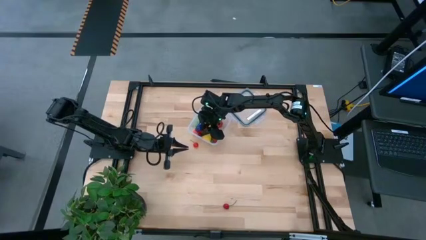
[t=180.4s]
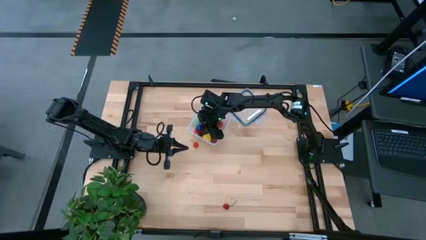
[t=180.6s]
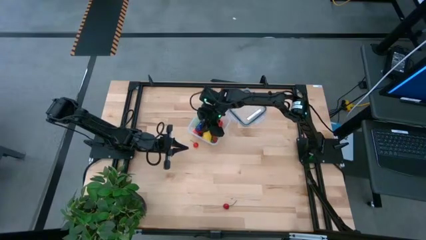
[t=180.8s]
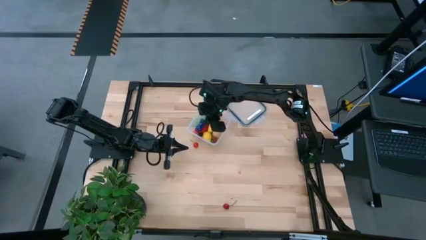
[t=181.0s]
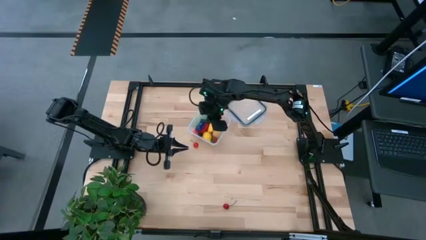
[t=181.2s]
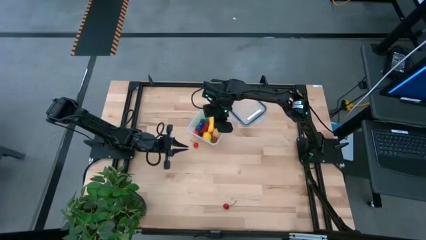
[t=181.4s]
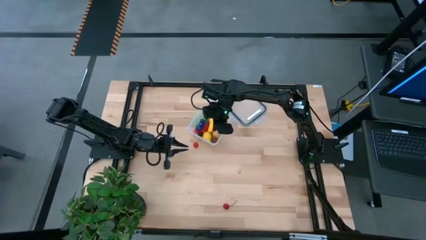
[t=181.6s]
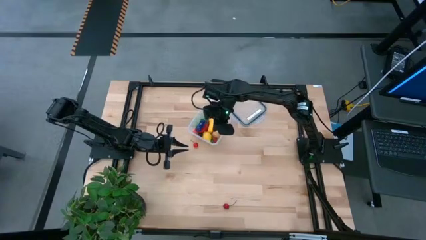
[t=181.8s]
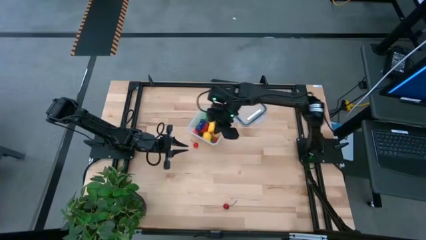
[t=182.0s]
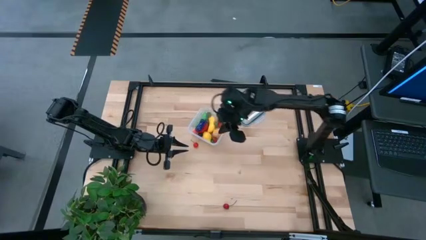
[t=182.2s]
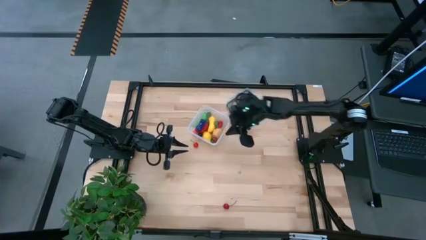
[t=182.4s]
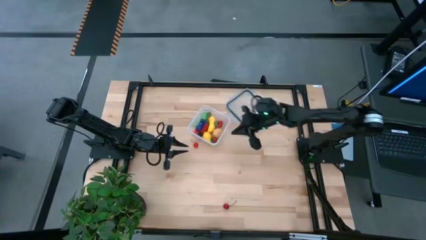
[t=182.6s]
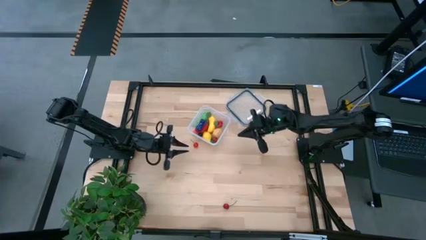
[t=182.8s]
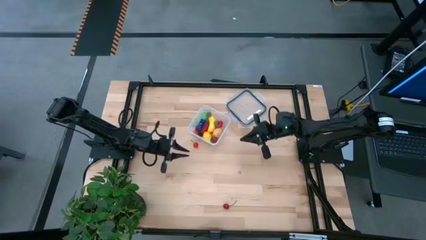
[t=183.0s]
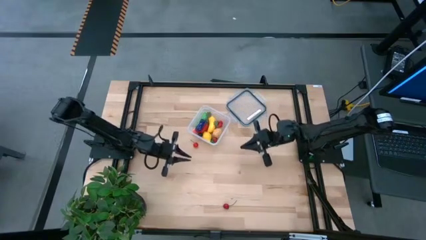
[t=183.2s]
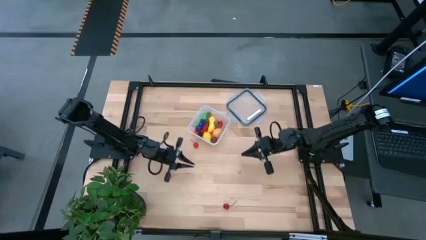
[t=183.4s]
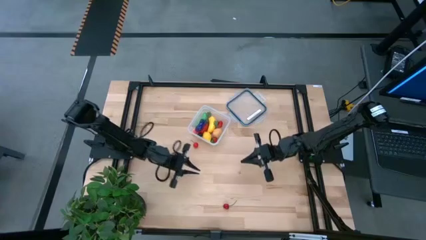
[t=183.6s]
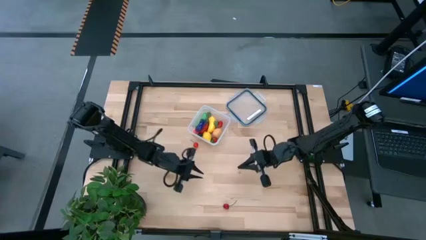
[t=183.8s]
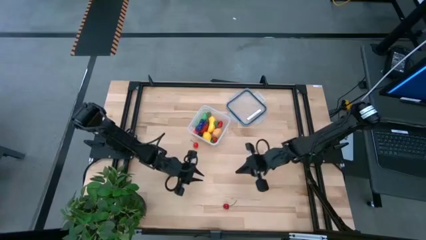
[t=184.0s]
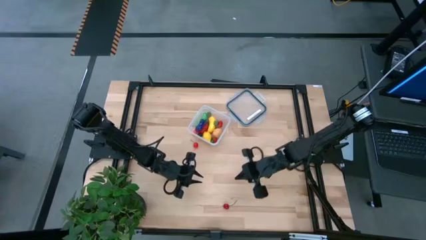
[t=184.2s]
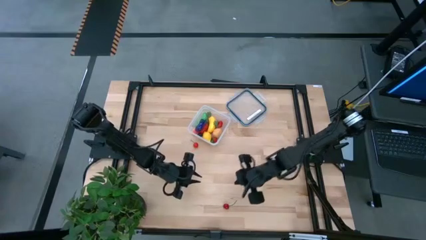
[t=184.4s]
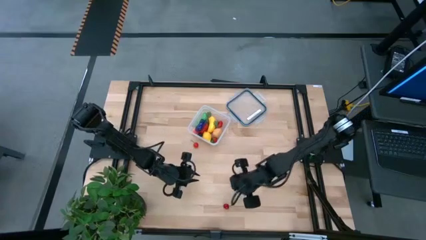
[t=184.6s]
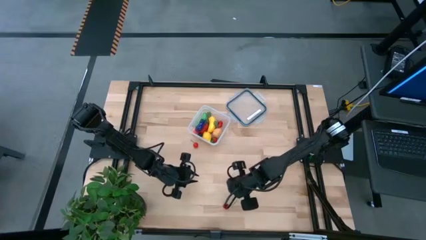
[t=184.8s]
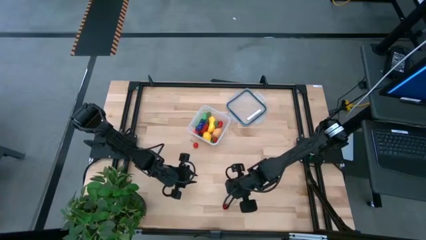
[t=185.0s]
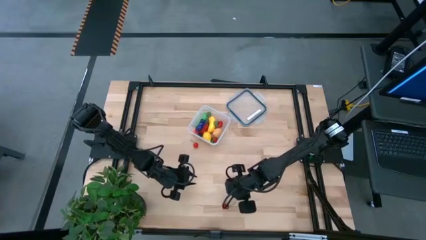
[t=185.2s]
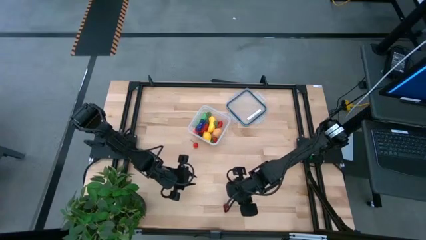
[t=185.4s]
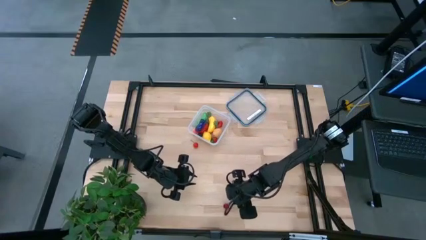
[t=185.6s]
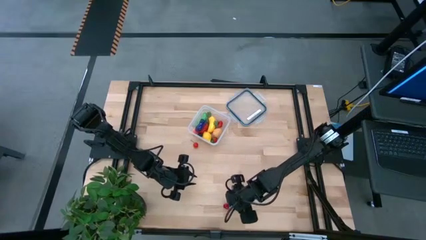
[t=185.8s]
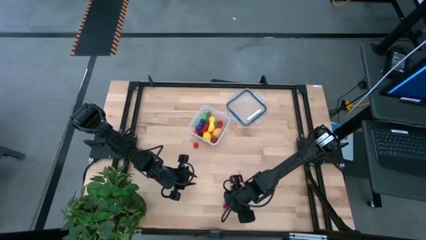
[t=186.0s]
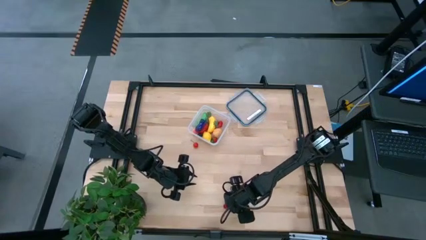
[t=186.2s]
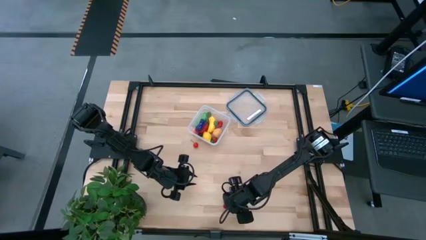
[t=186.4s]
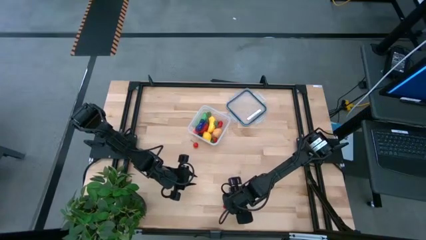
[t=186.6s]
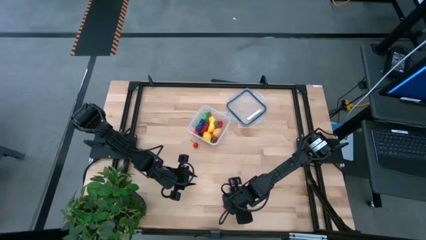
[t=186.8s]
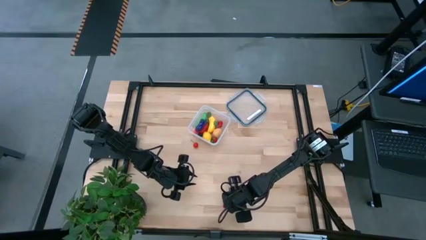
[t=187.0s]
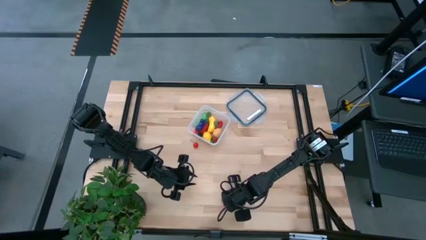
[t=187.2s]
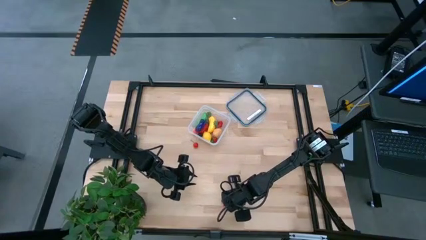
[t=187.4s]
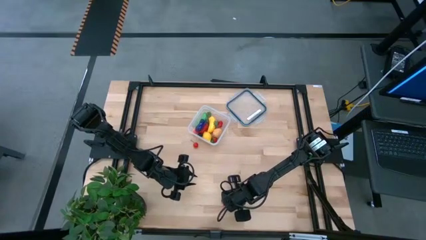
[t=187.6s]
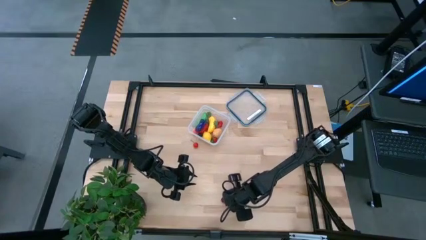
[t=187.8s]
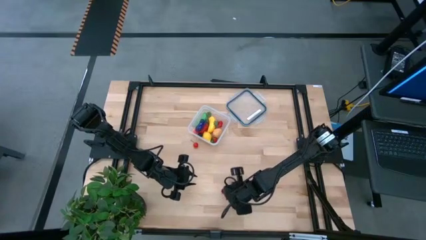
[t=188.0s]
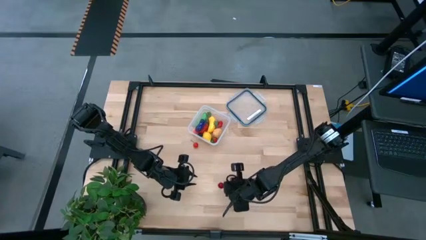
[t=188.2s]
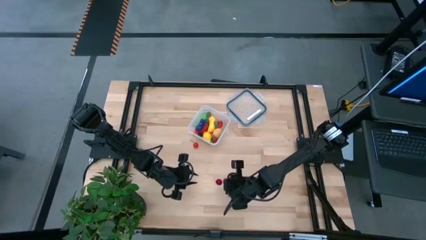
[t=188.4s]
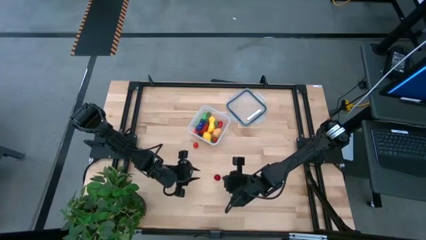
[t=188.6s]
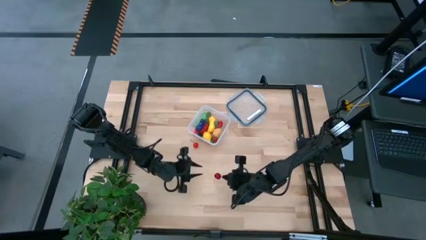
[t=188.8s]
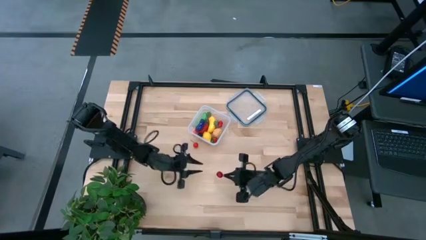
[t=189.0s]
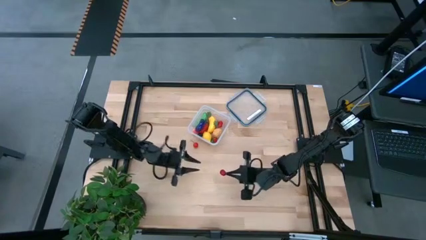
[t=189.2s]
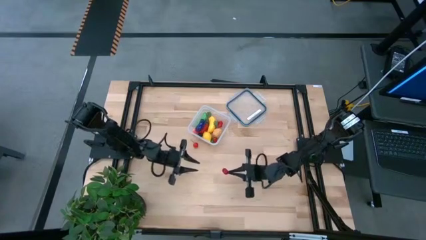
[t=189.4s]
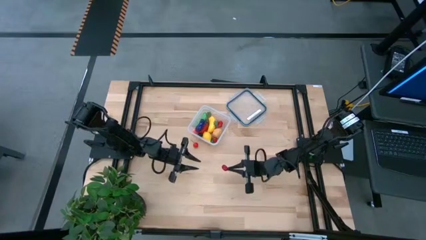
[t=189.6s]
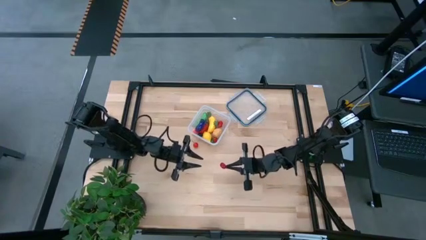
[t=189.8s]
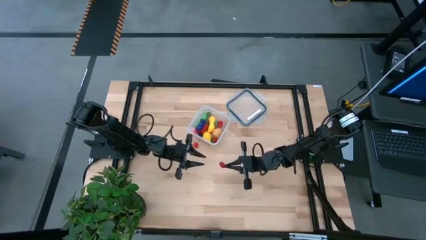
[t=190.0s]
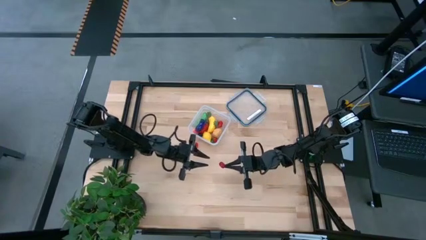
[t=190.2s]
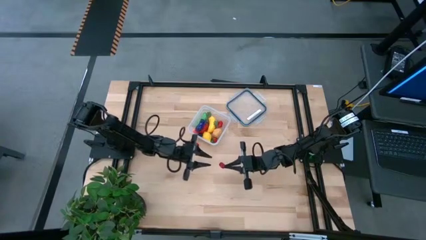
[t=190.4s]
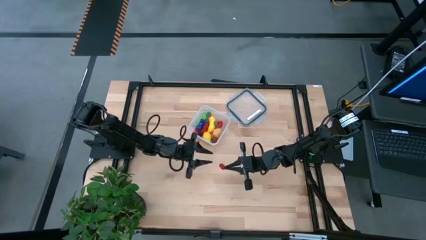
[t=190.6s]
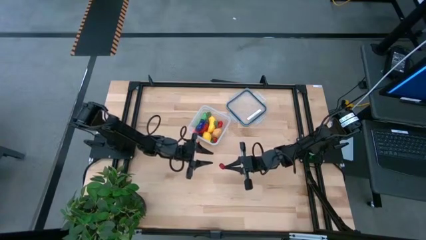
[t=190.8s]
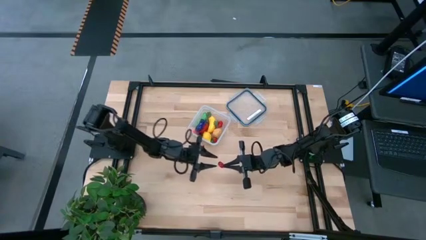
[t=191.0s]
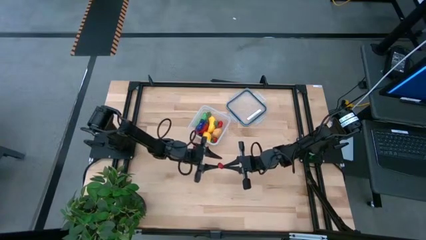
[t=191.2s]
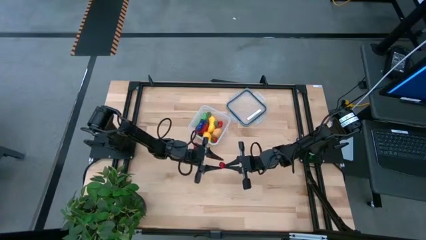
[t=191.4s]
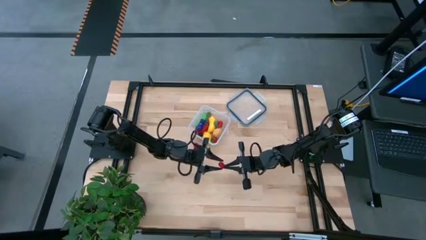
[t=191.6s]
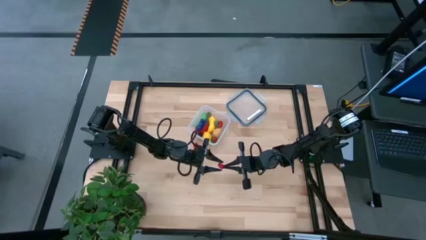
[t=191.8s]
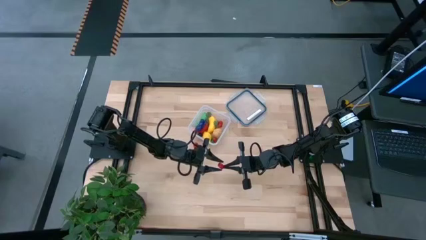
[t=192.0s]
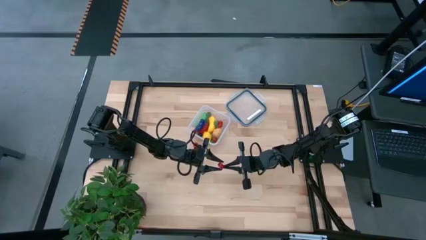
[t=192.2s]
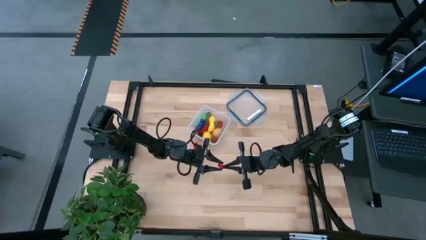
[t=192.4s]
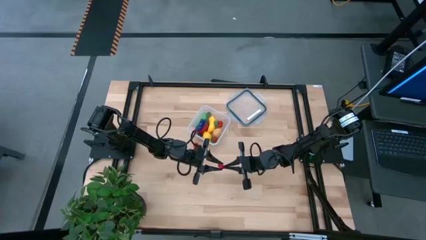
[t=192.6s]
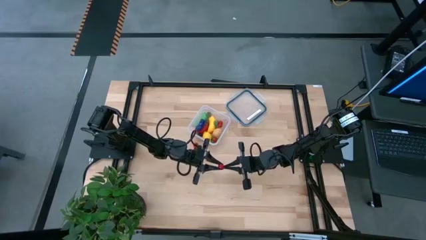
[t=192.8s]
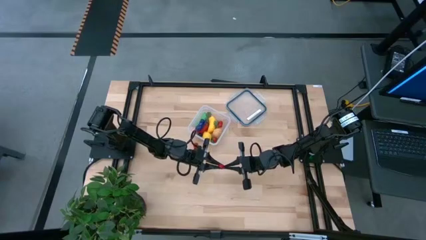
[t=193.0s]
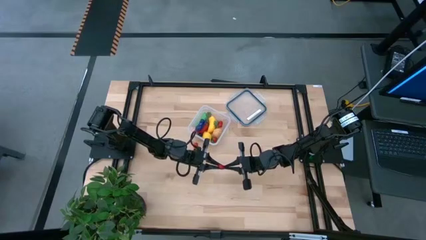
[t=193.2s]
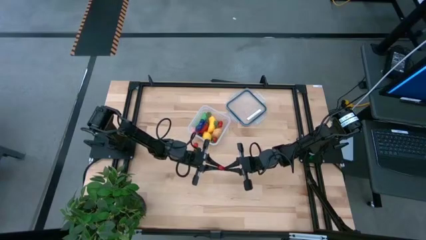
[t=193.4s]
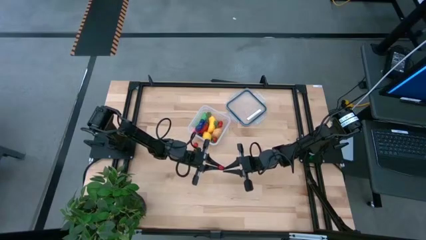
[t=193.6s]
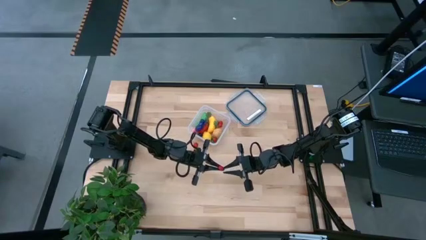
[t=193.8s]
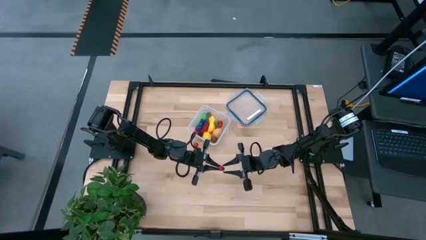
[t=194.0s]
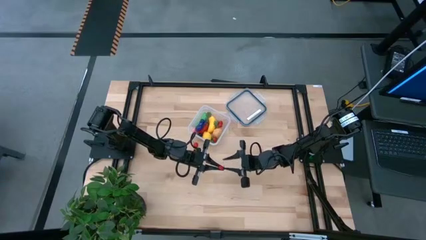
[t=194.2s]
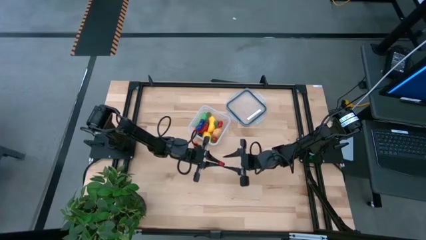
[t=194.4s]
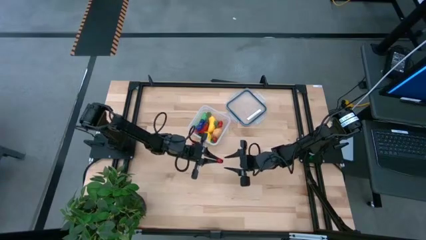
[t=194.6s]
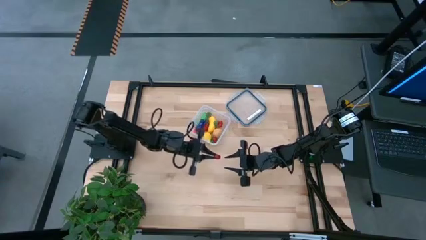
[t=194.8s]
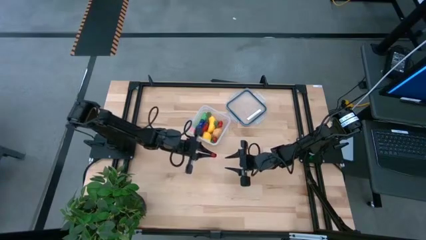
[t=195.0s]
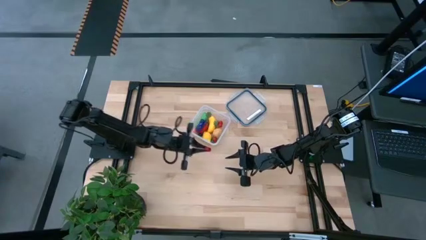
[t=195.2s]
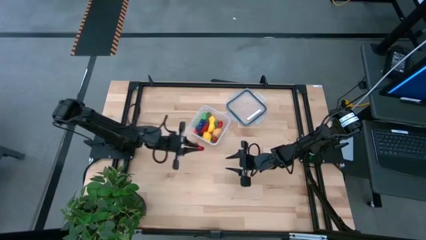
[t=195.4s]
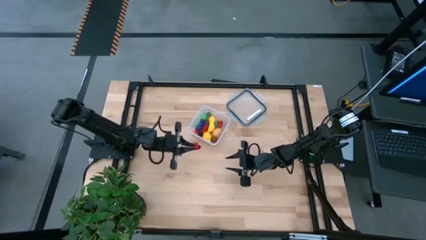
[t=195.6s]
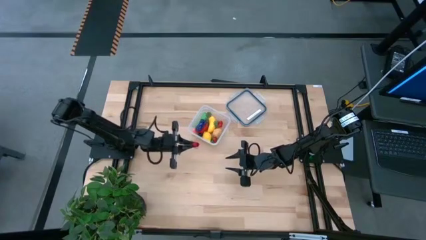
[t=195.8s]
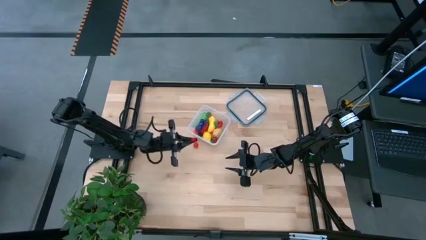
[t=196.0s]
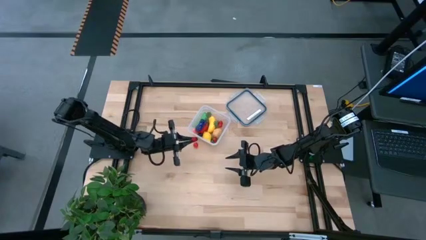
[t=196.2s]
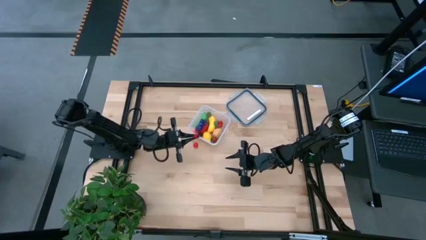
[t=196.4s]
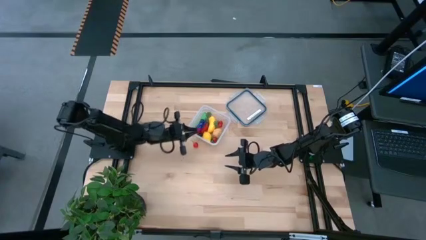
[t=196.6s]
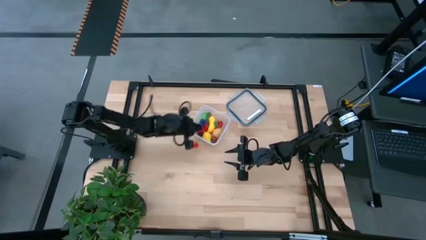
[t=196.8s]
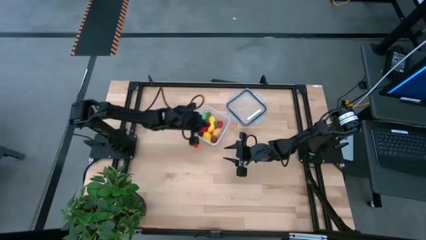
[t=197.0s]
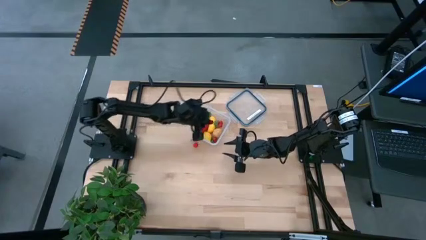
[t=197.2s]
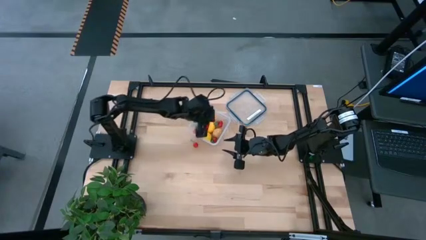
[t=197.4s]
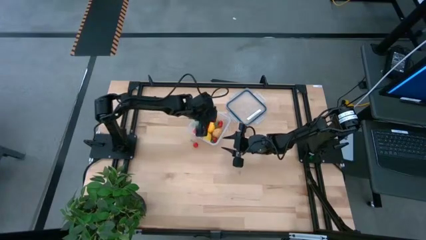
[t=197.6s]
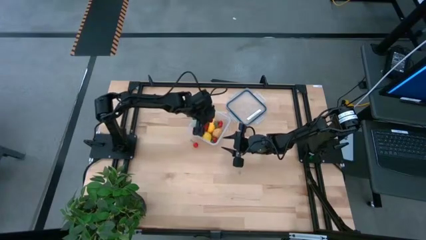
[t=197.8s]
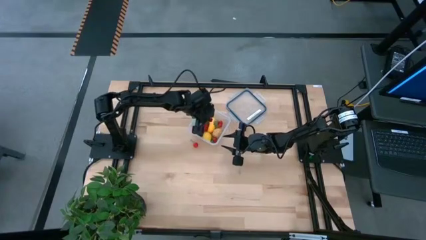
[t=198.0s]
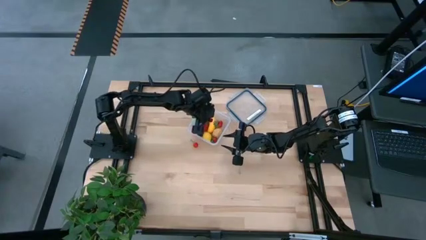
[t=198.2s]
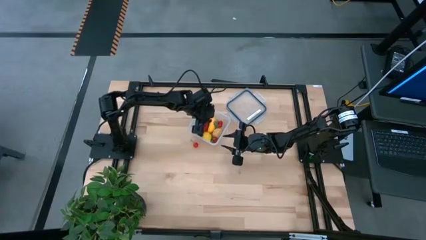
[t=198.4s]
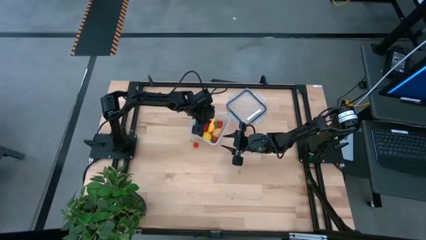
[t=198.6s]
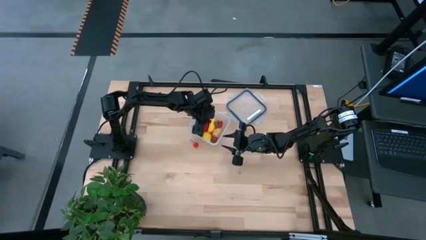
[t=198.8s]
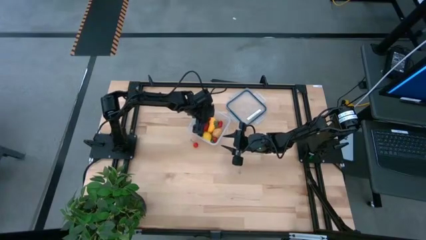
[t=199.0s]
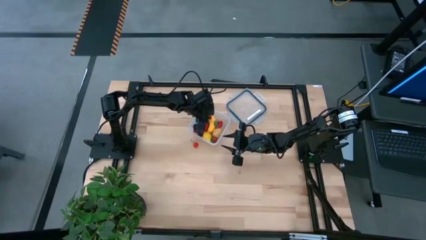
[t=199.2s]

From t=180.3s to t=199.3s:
Task: Pick and placing Produce into tupperware
Put the bottom red cherry into the transparent container
